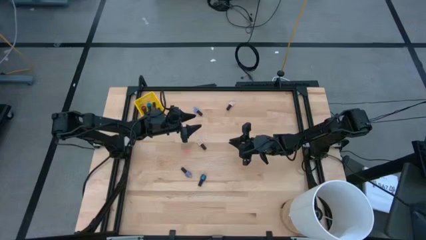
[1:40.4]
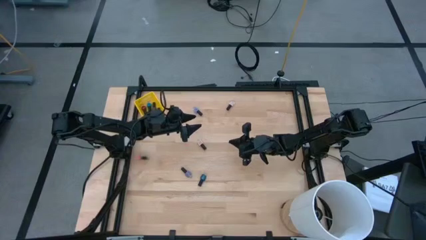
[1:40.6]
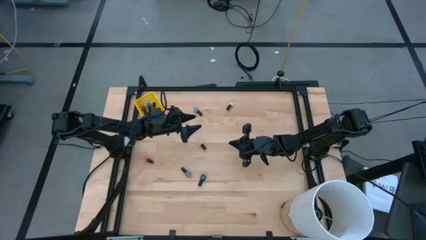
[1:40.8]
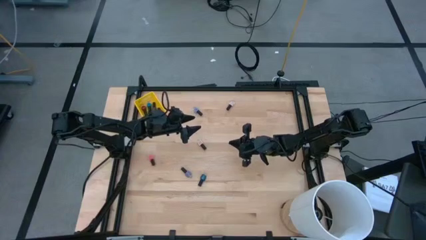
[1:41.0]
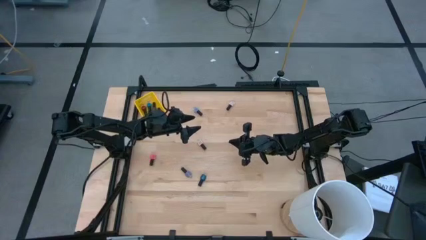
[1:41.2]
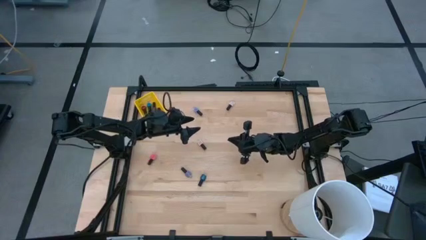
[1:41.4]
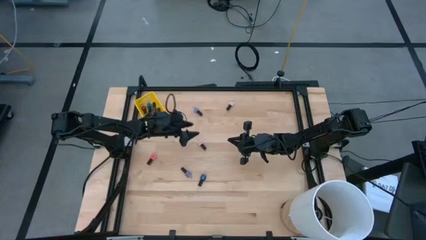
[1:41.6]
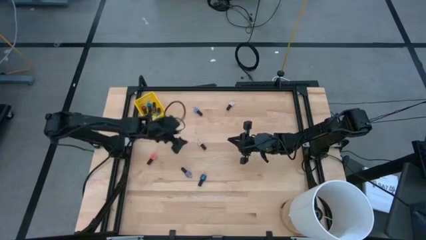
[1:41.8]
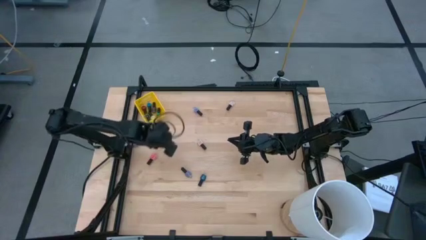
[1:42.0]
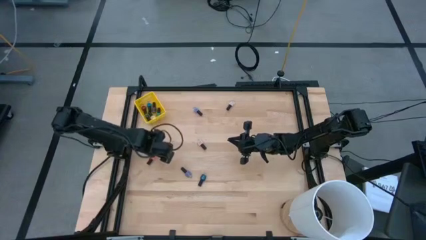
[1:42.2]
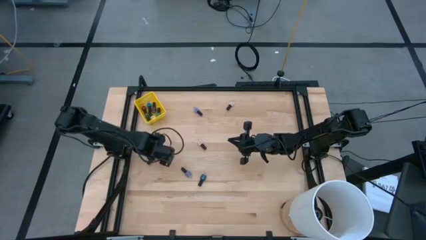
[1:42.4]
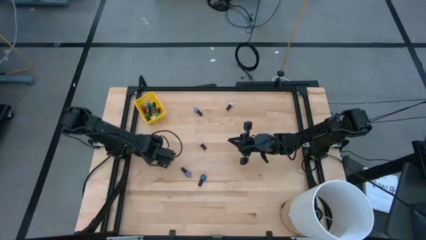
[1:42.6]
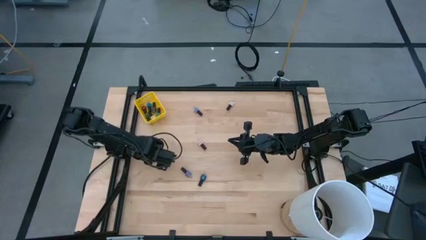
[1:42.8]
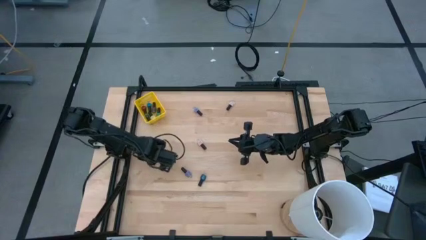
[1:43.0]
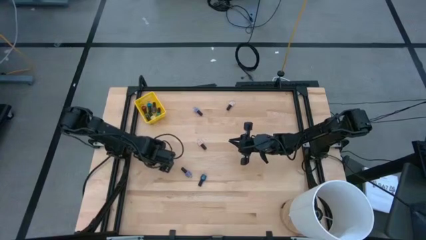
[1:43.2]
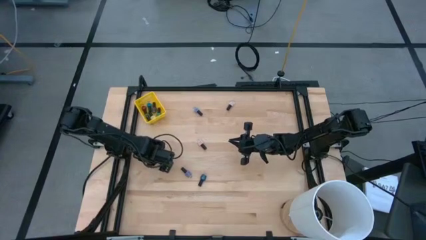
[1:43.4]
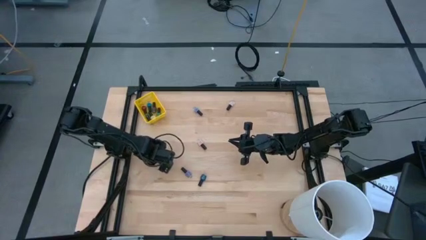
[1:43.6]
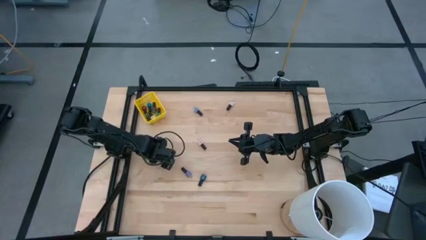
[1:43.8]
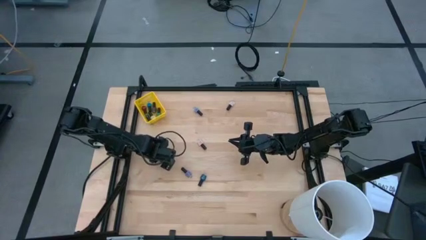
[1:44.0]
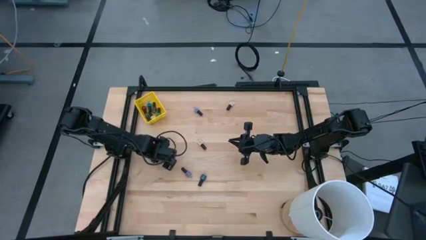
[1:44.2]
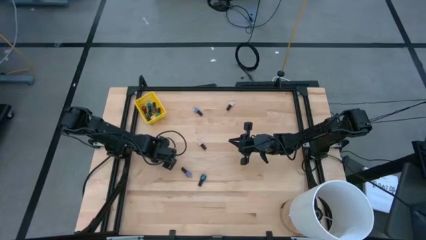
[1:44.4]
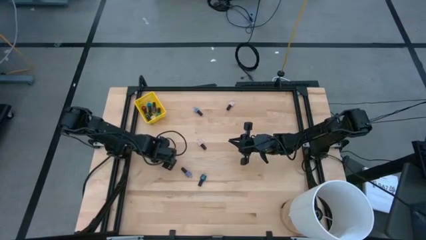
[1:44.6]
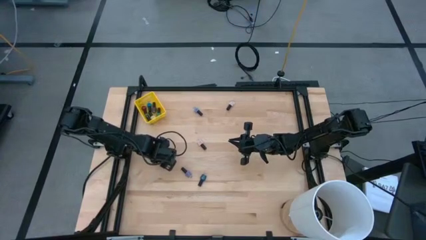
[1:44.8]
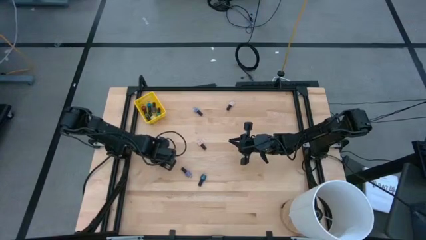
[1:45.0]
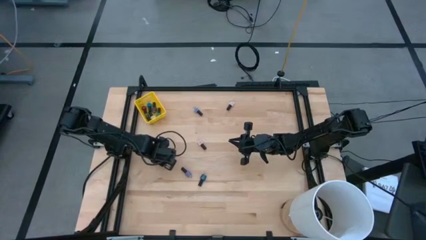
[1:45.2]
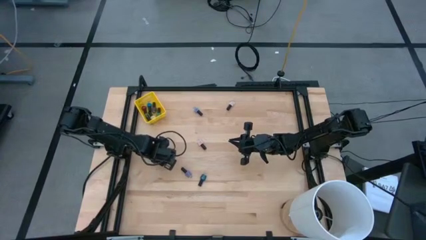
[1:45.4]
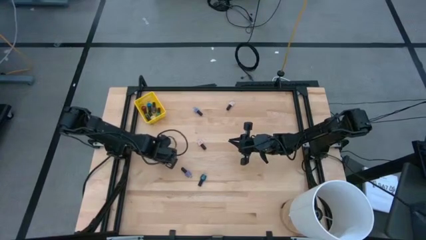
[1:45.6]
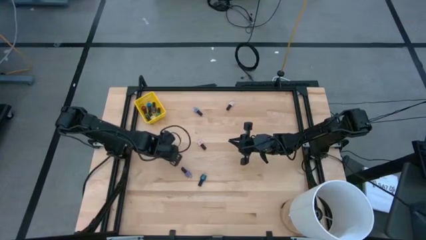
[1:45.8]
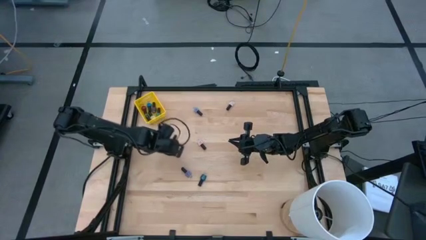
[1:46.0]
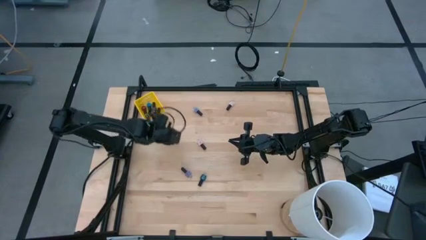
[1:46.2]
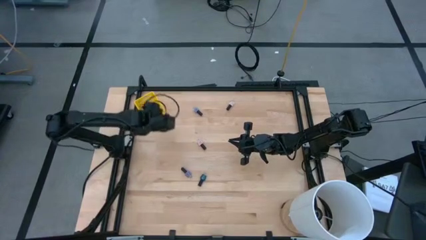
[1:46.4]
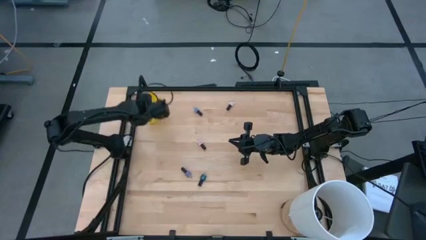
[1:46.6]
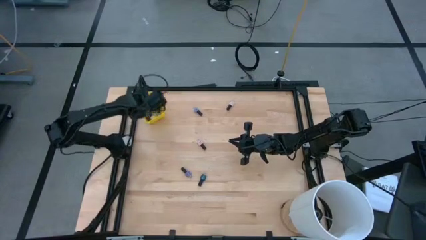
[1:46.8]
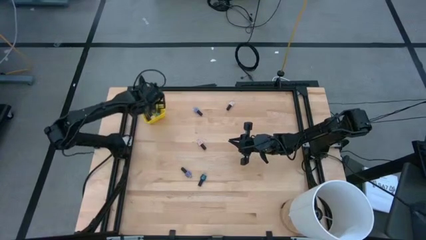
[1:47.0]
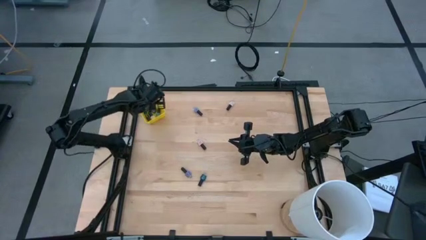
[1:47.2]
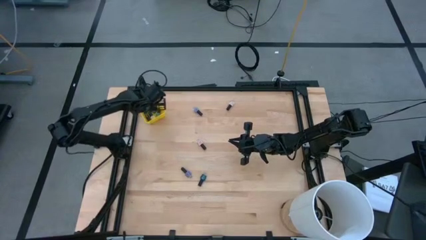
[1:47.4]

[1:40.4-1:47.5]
Task: Pick & Place Nail Polish
Put the dark pink nail polish into the yellow bin

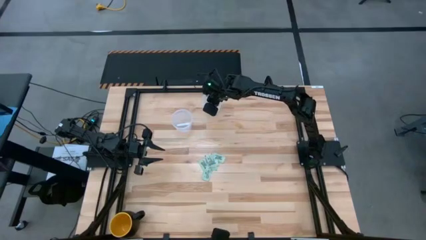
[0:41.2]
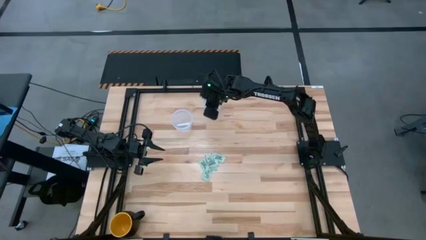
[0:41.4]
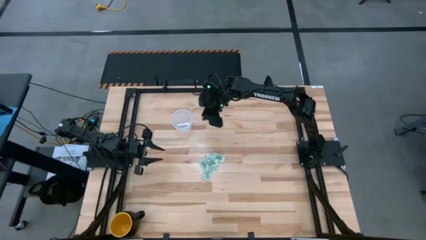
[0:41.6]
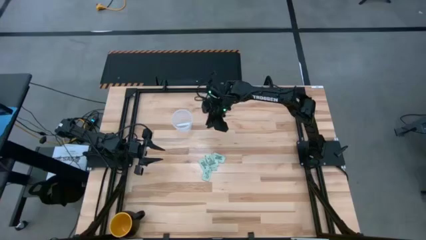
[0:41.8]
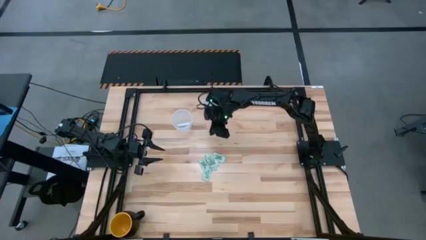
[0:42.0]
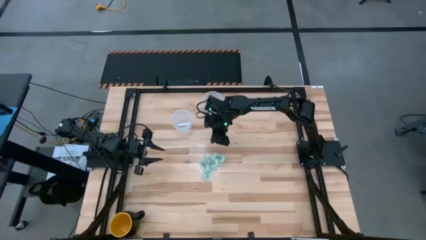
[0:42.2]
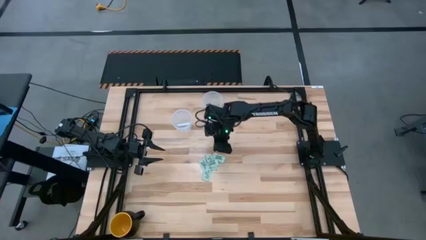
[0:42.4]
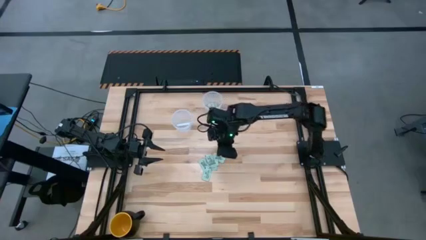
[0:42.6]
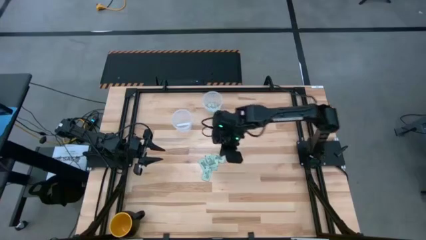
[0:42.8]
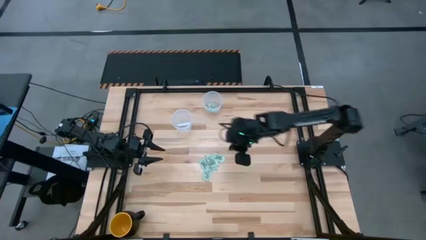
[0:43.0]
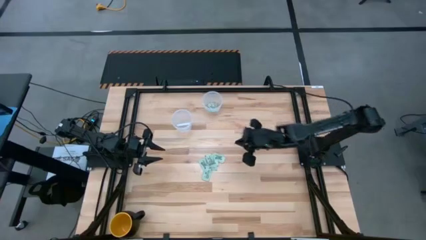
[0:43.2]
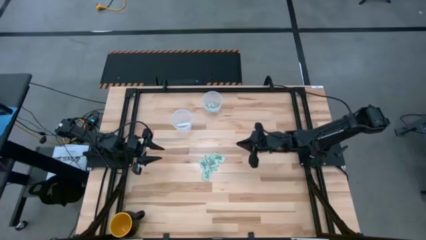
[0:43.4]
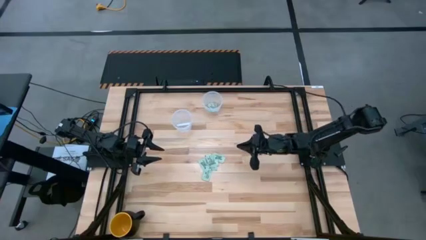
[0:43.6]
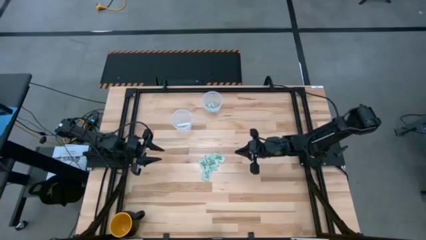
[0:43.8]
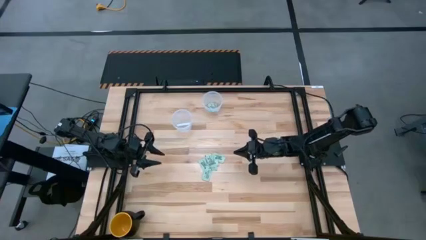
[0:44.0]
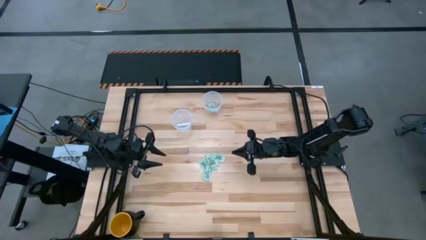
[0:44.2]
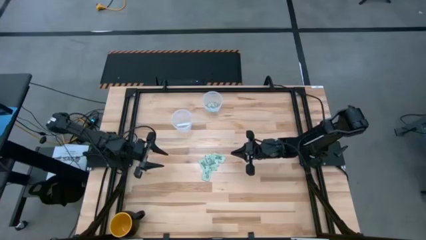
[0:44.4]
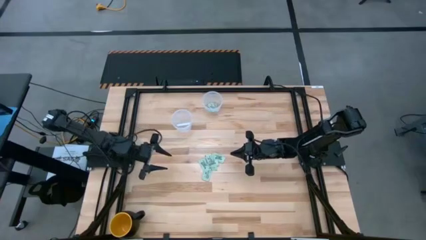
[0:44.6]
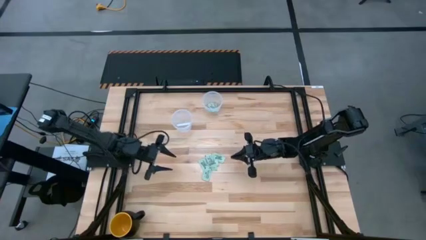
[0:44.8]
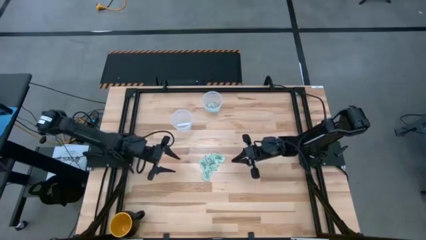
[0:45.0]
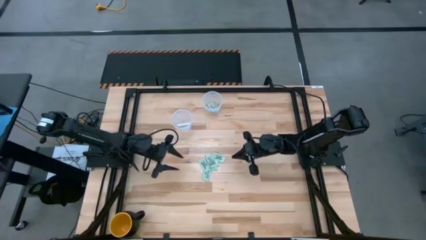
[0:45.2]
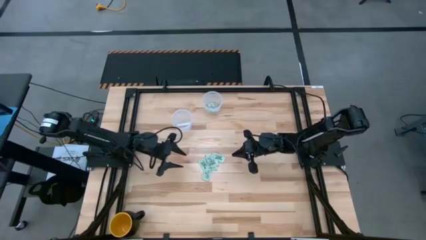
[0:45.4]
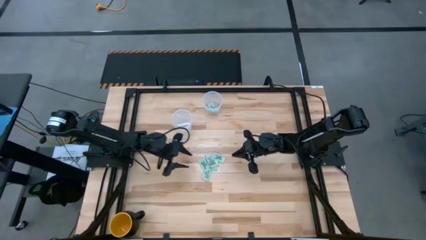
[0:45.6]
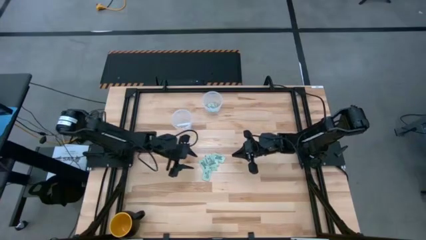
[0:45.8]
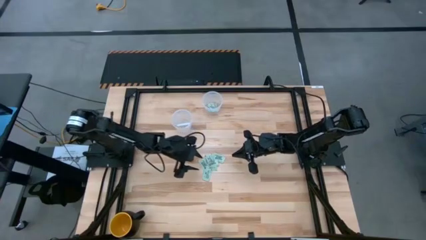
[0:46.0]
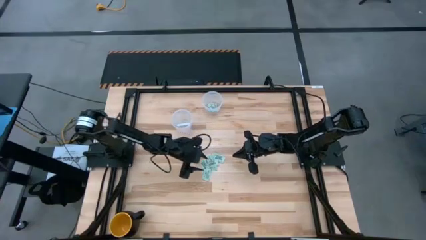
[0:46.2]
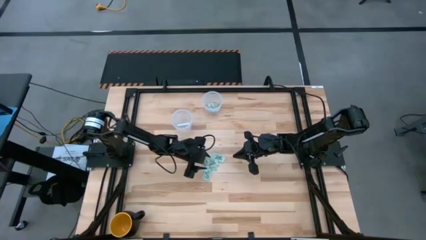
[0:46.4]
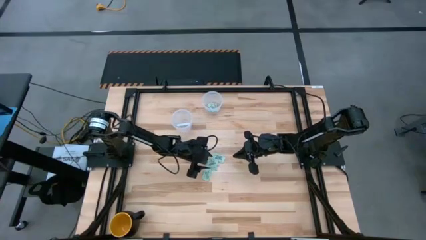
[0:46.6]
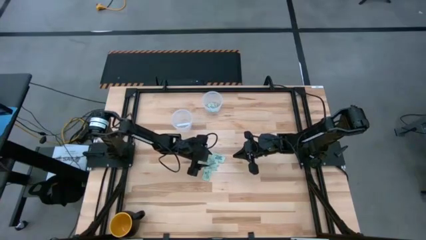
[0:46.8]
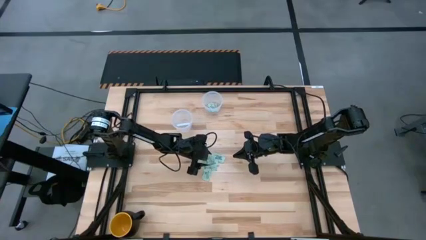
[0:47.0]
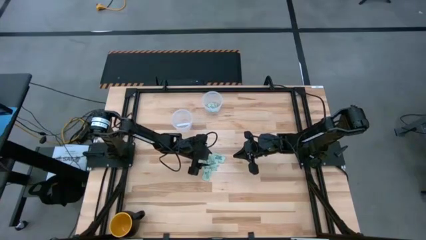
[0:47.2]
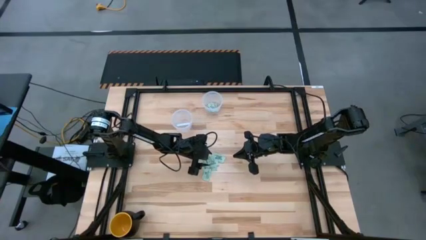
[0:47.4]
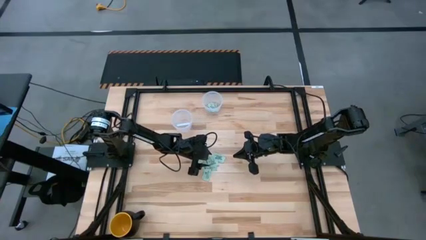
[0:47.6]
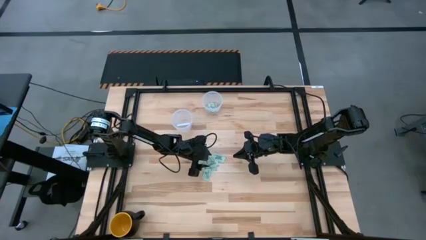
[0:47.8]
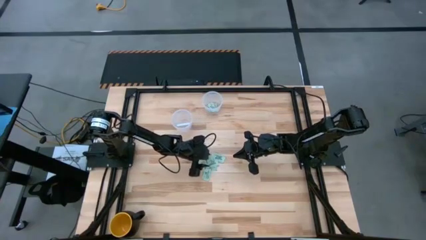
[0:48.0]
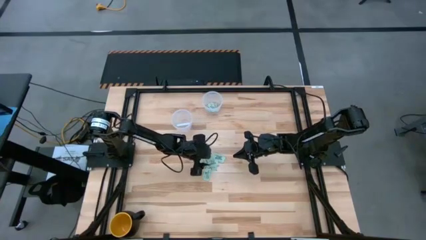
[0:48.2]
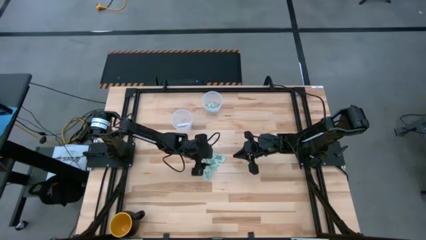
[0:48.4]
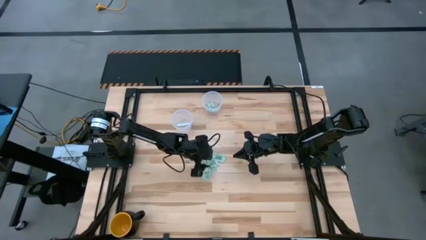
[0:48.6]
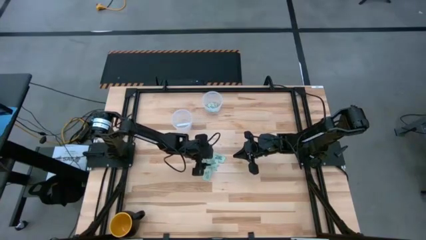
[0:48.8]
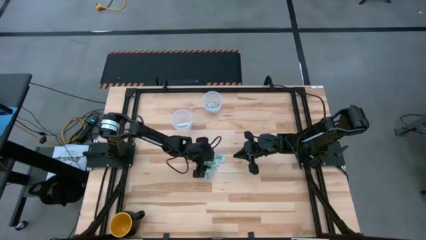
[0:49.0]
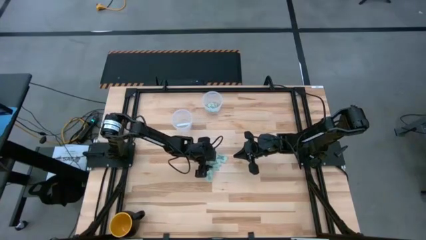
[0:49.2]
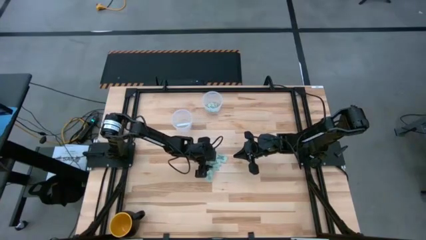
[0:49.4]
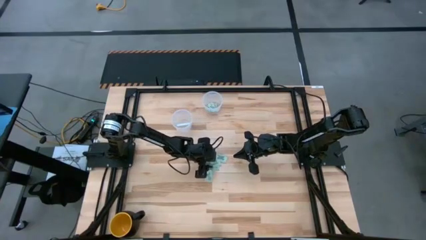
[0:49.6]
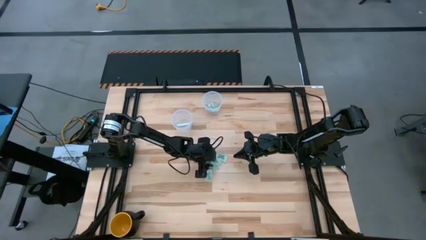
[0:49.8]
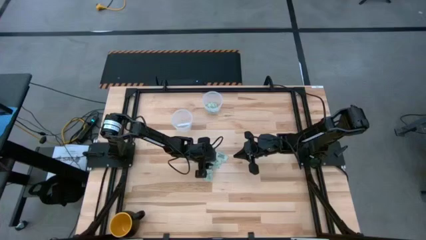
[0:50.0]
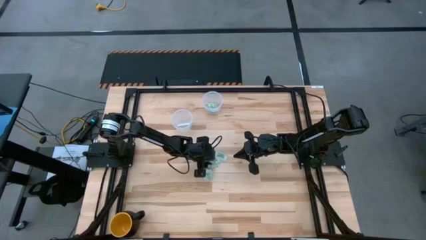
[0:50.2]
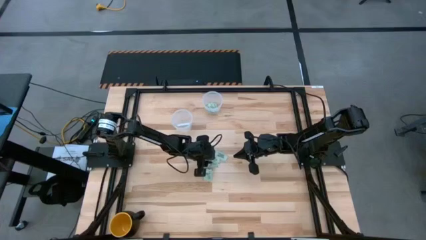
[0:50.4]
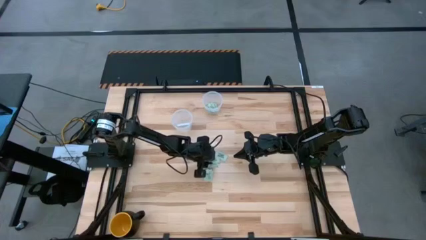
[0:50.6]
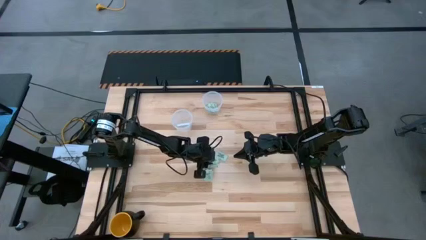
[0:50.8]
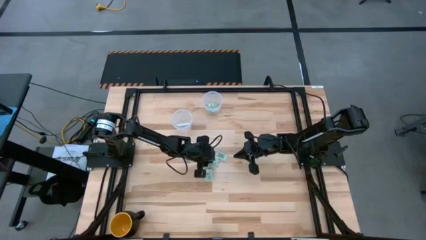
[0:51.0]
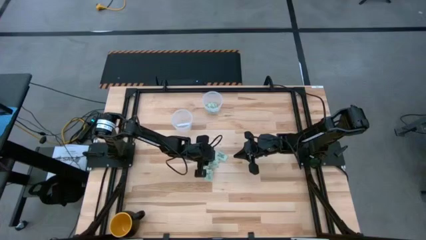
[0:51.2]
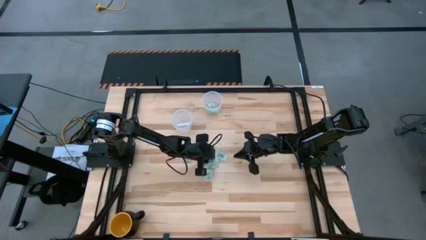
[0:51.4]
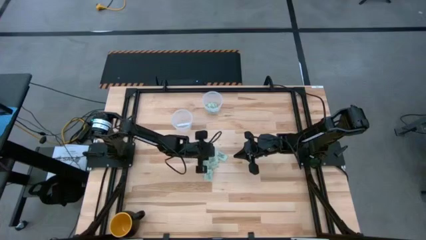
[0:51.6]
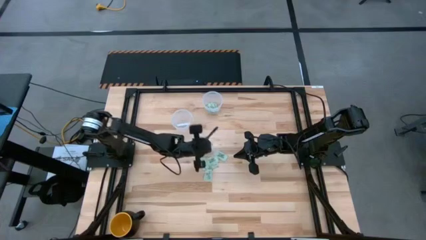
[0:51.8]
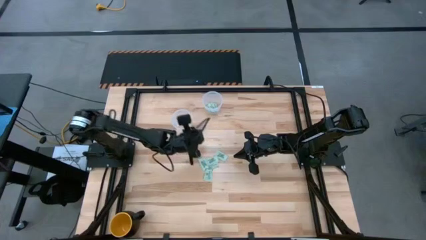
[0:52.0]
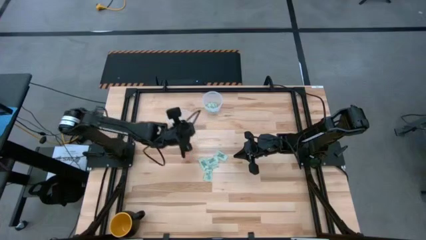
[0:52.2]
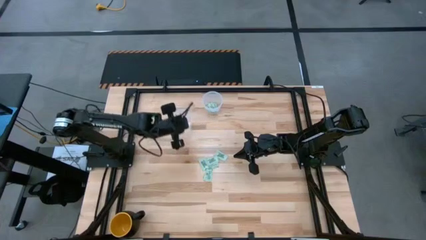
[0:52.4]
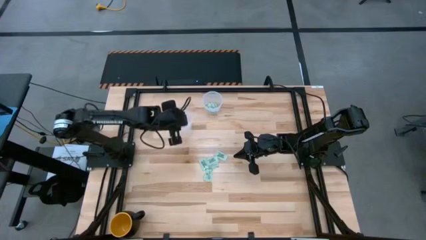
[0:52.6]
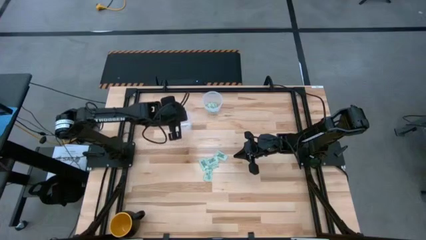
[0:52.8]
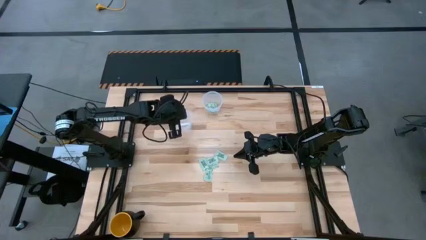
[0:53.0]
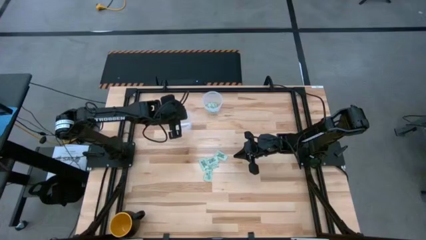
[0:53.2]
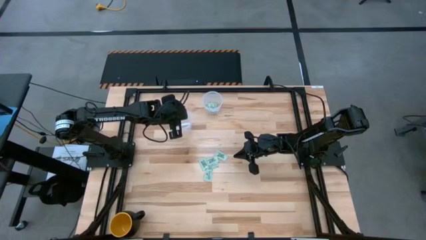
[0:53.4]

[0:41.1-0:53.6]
Task: Pick and place items into bin
Put the stevia packet into the bottom transparent bin
